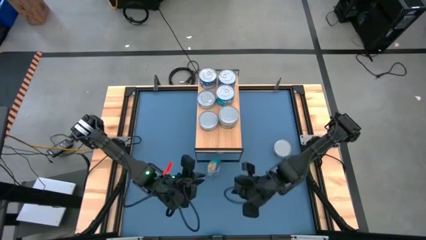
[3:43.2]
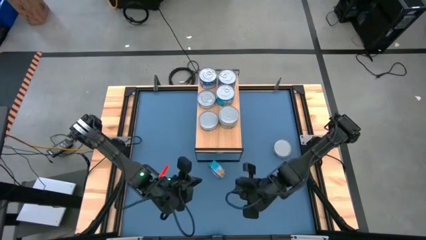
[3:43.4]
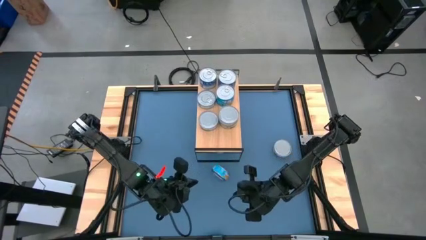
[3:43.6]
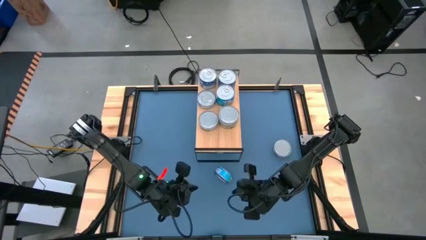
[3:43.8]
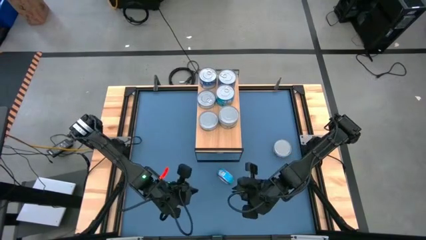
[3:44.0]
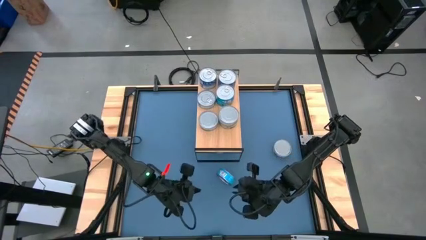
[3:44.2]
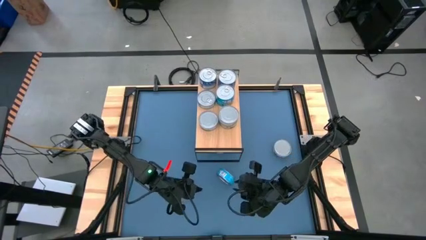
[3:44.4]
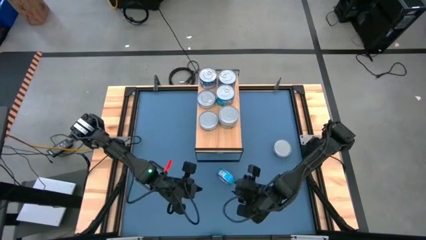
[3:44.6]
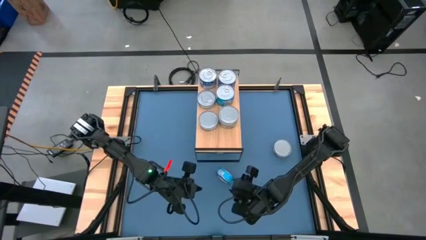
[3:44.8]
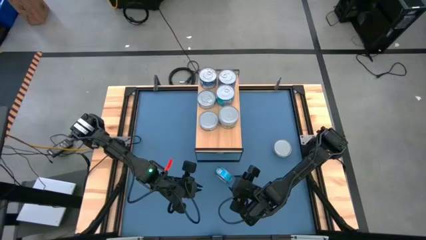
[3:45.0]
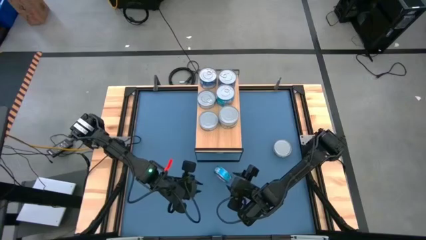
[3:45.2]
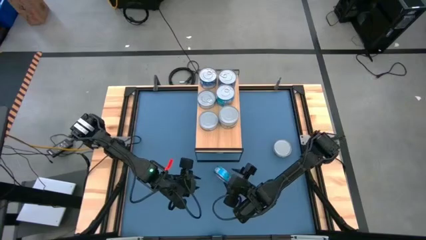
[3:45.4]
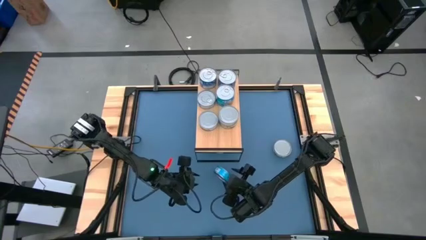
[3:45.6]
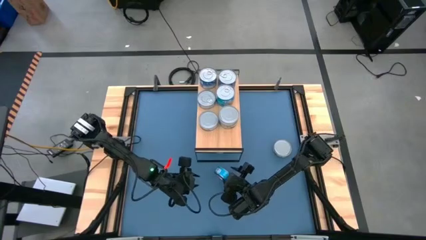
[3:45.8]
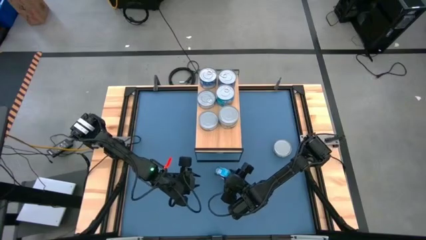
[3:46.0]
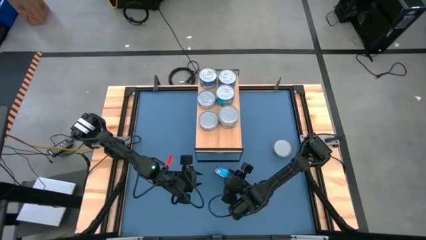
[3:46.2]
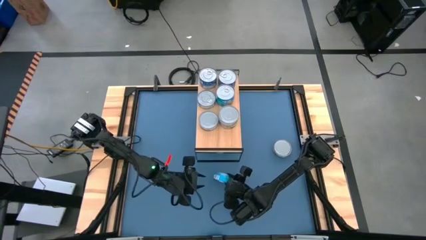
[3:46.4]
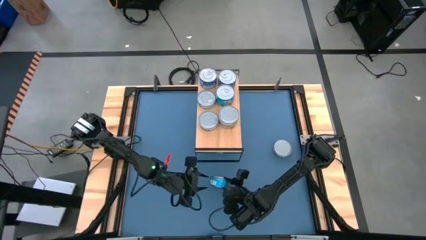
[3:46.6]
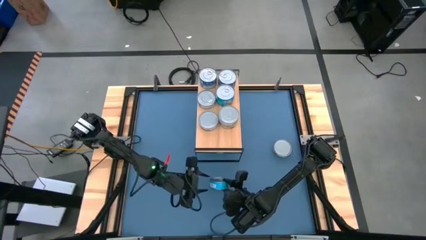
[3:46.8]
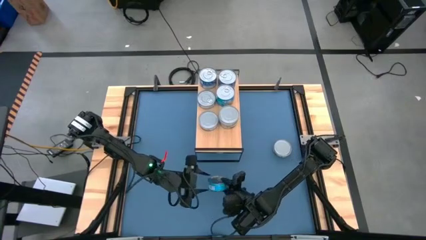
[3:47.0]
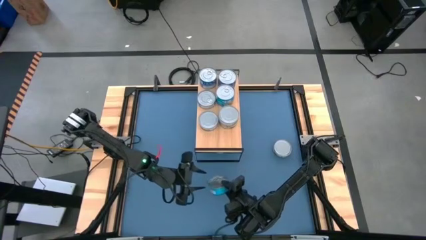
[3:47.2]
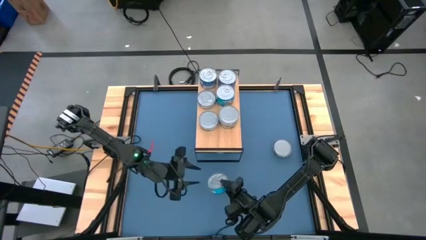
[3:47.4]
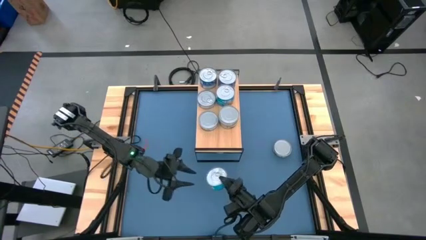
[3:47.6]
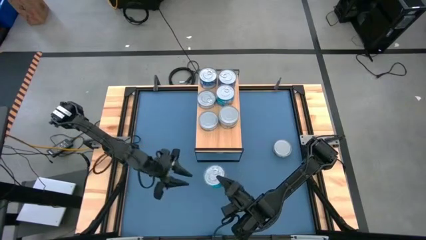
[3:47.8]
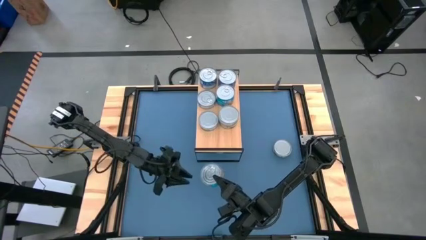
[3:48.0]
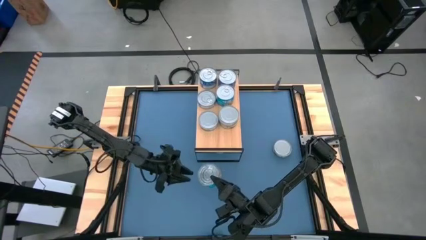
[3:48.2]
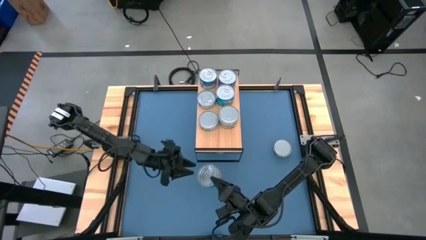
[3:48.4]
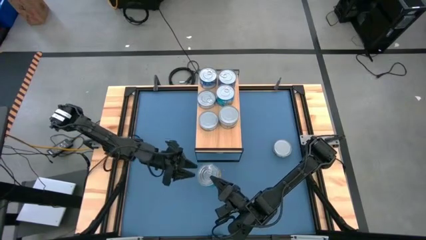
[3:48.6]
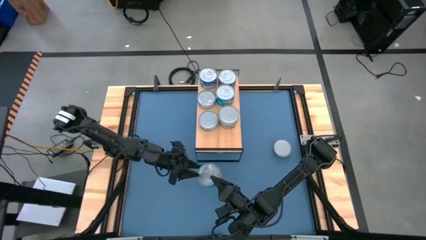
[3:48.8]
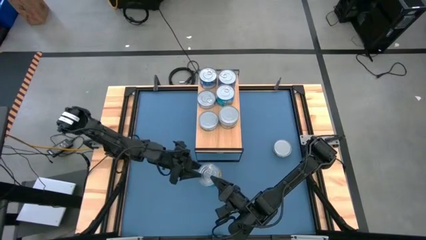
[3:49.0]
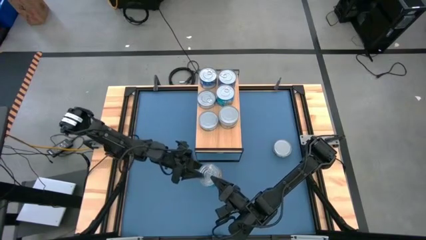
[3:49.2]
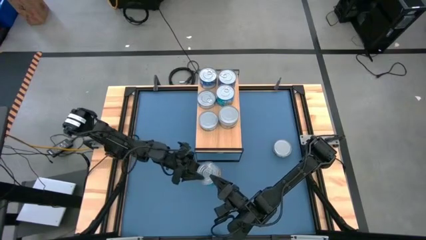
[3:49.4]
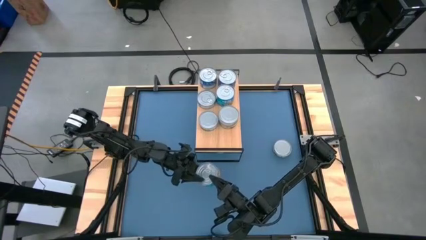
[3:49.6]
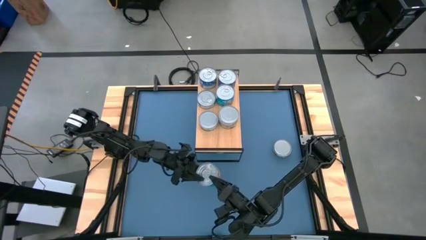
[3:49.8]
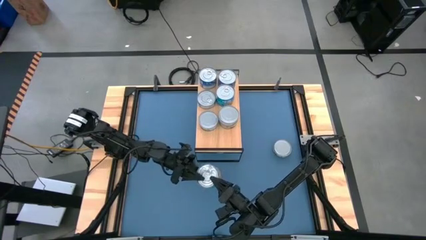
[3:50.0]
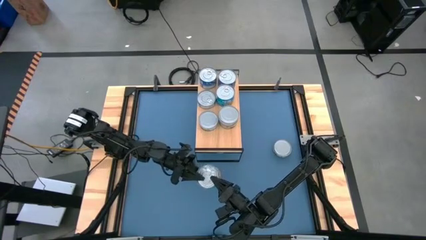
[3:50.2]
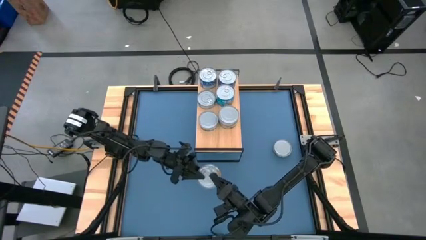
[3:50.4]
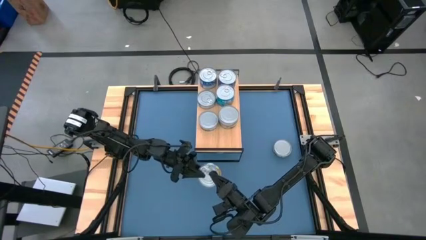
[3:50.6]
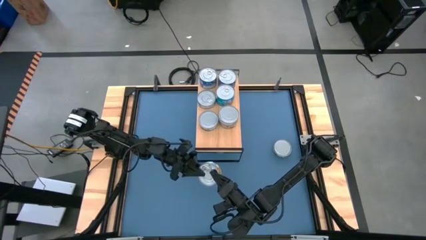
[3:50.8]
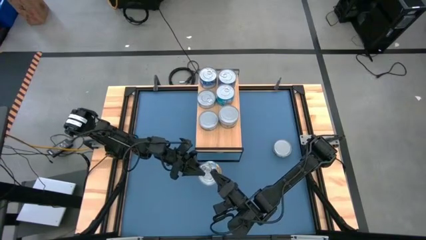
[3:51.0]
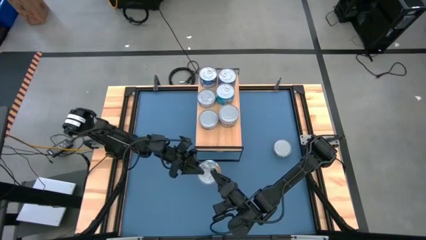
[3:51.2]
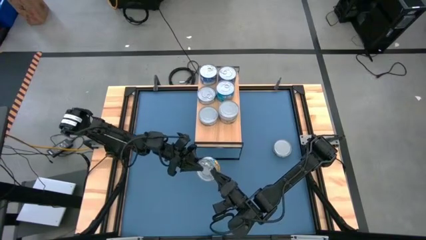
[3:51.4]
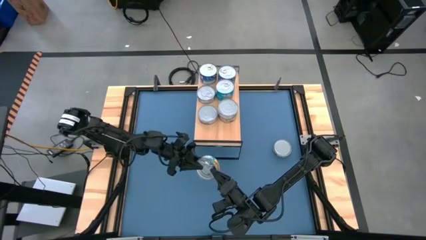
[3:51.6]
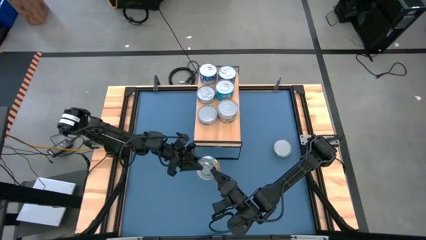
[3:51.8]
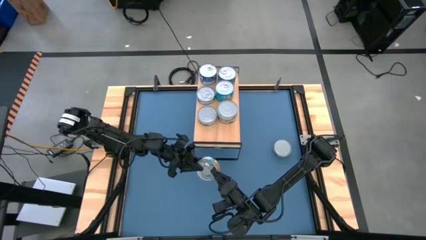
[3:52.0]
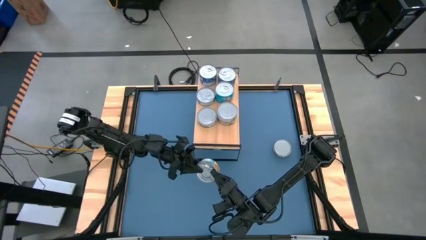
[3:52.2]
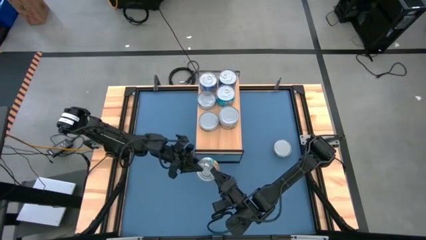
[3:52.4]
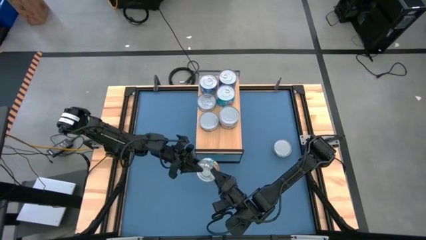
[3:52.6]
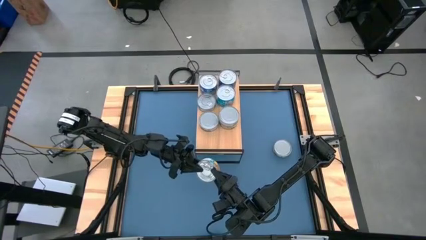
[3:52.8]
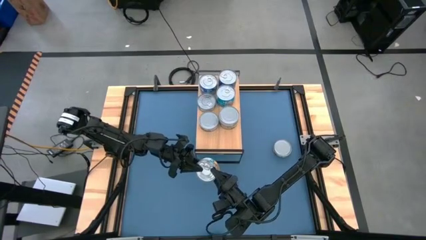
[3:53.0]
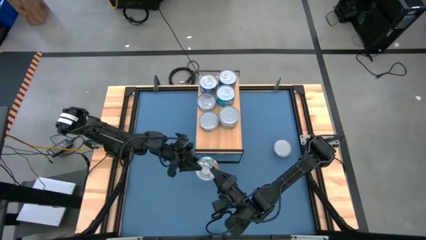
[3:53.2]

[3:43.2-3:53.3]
Task: Stack canned seafood by type on shelf
Stack the yellow-blue tuna can on top of the other yellow-blue tuna can on the shelf

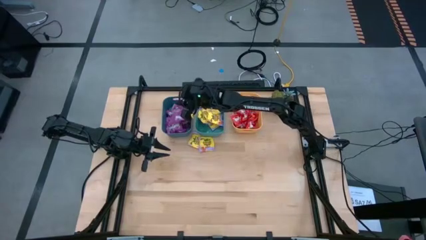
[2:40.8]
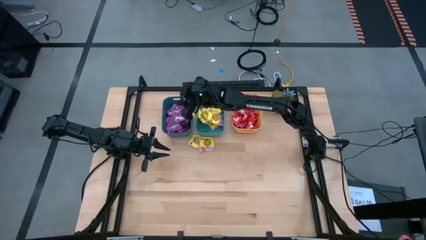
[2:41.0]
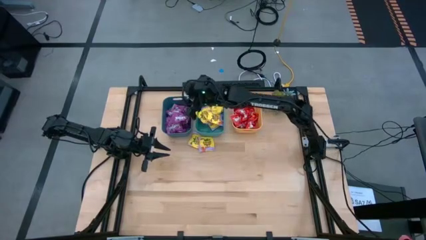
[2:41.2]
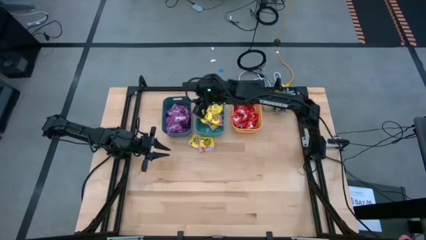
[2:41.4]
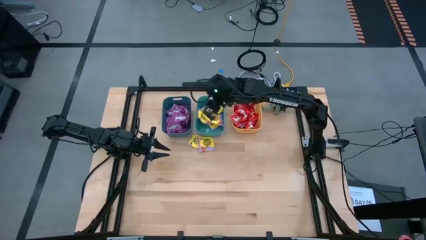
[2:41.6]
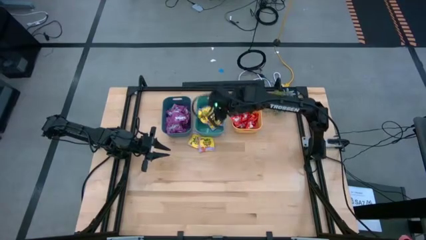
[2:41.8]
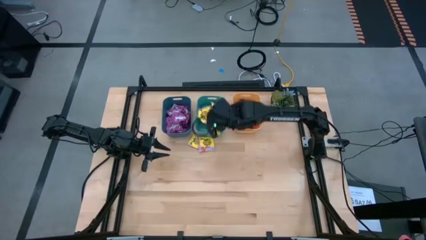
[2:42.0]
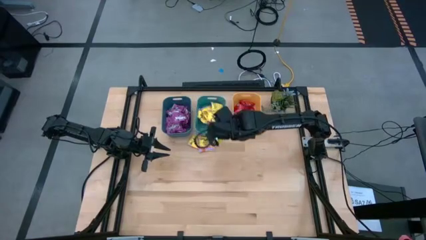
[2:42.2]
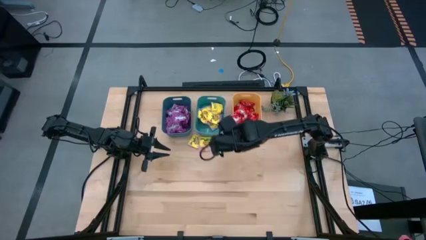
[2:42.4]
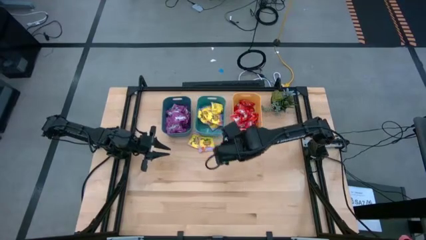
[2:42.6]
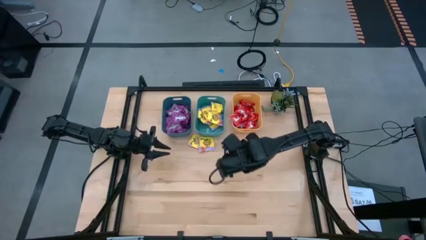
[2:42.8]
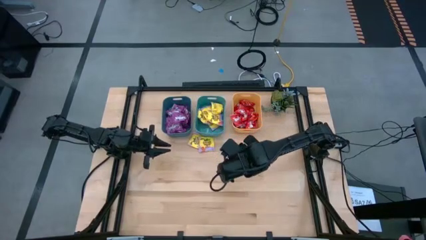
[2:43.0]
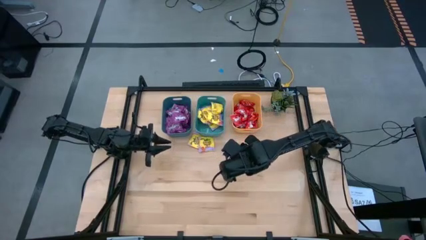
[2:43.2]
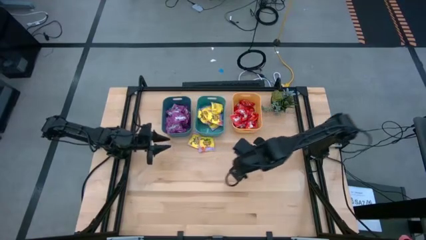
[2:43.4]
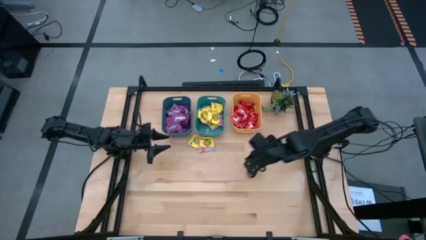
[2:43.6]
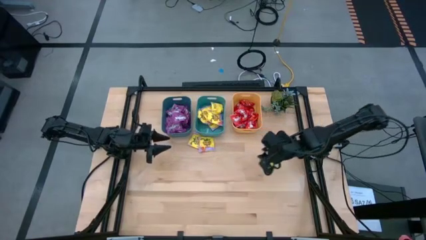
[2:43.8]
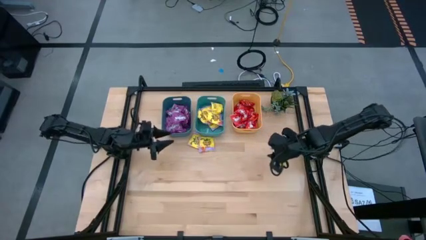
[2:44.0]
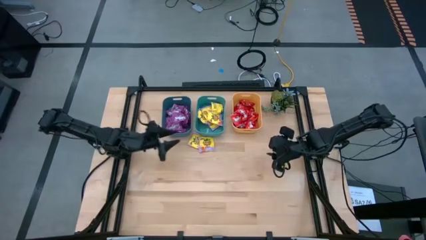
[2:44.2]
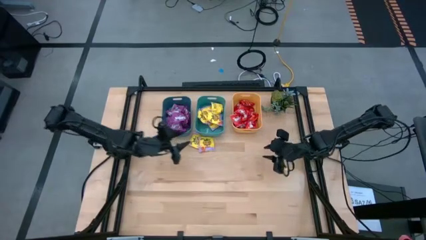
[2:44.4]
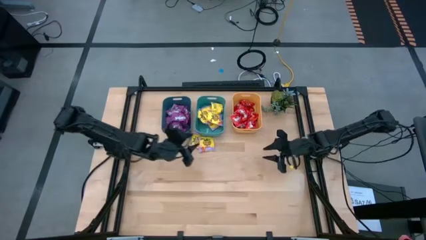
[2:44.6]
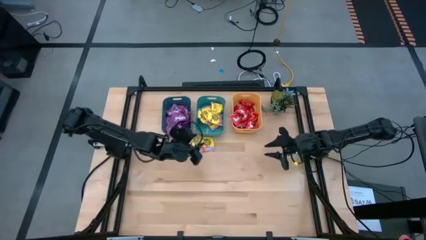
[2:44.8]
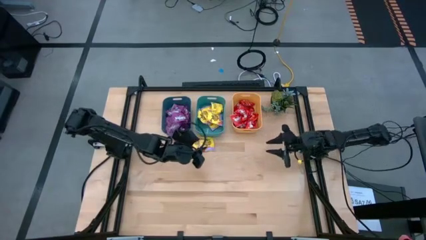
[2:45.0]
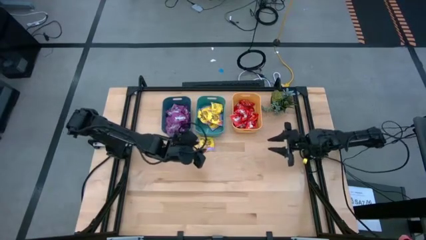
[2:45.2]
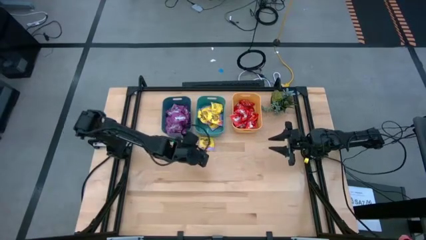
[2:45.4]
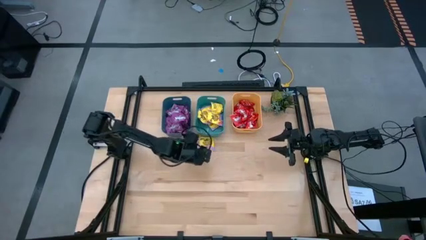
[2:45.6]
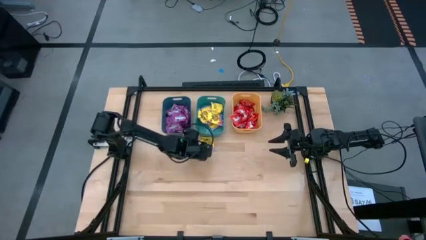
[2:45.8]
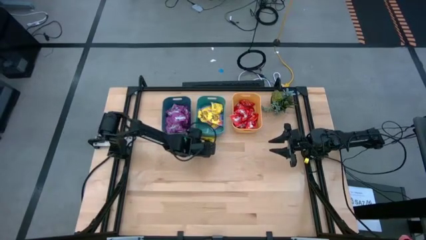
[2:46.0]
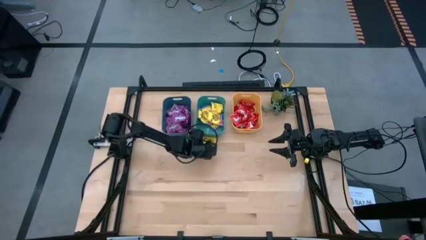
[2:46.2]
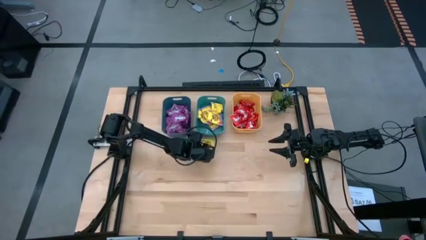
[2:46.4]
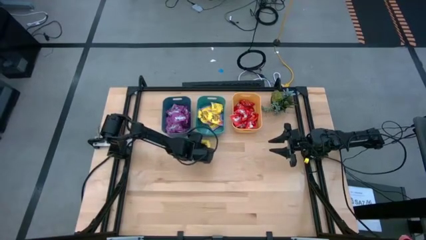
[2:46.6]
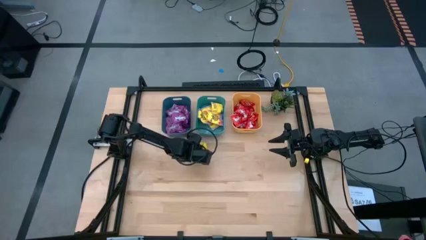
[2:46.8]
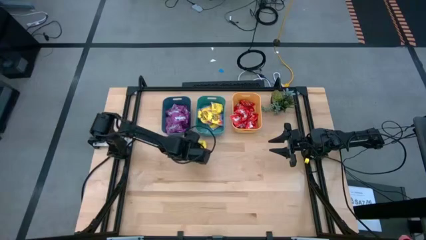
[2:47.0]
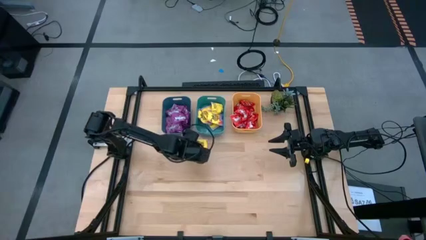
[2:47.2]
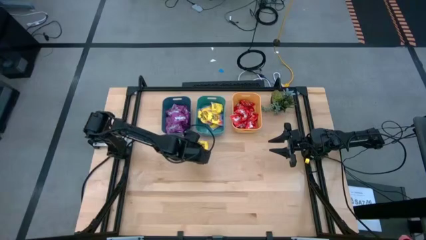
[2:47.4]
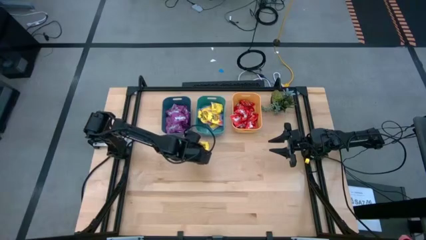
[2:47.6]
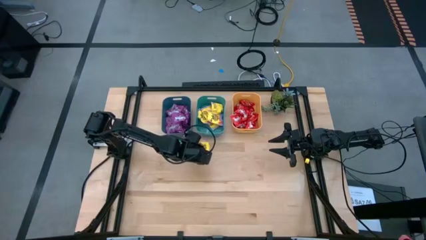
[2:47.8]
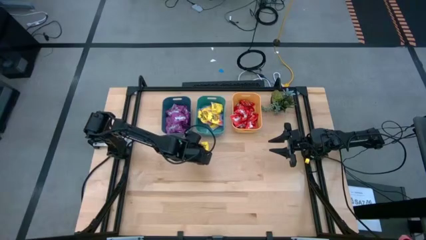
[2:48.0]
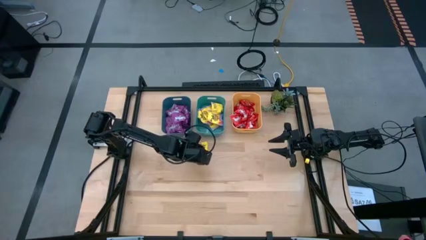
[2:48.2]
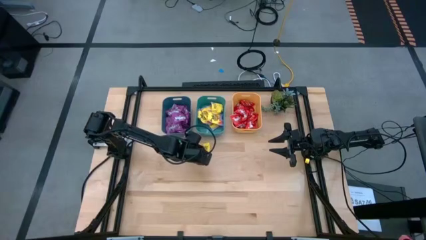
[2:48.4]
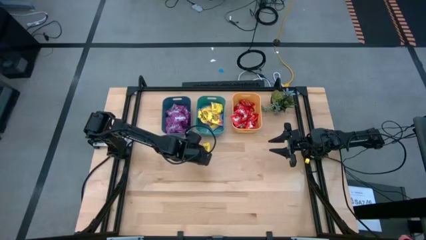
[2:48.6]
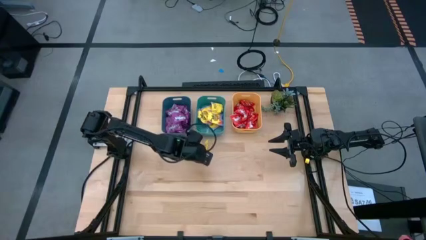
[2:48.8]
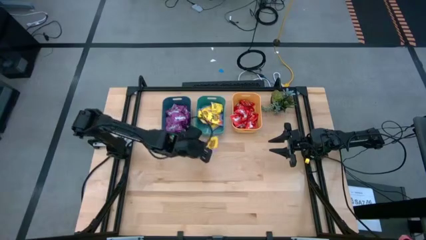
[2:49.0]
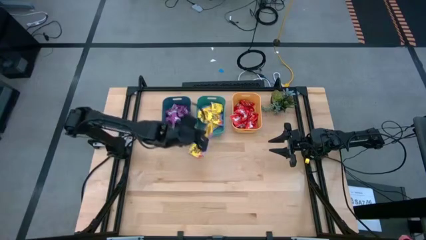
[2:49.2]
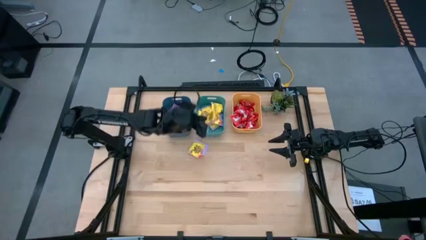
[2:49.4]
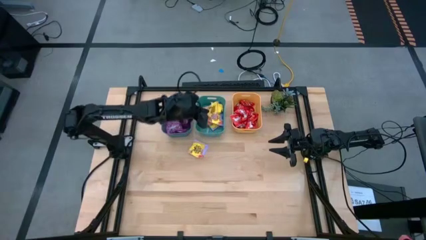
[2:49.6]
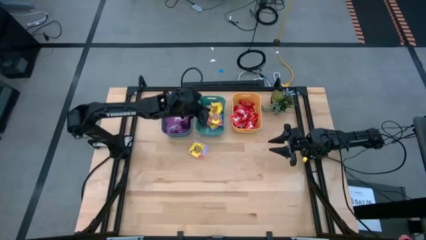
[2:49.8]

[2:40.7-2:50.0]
Task: Sort candy
Put the yellow candy into the green bin
